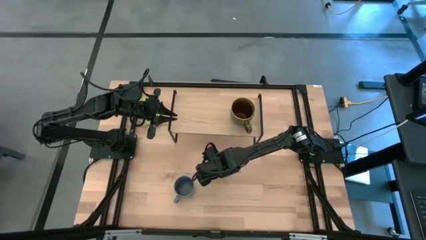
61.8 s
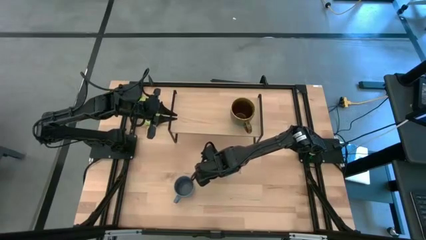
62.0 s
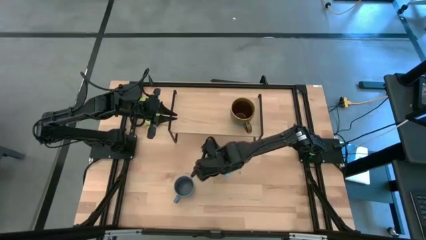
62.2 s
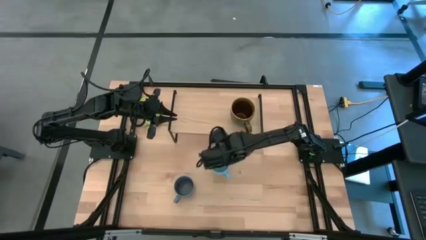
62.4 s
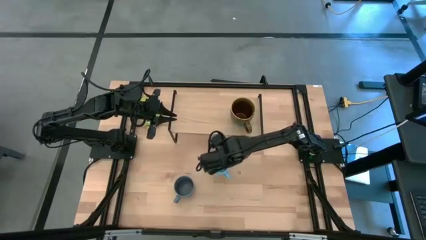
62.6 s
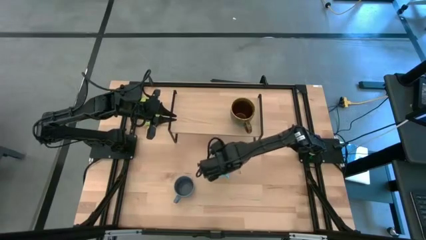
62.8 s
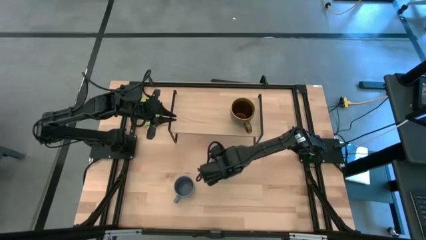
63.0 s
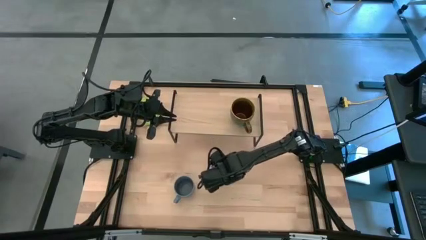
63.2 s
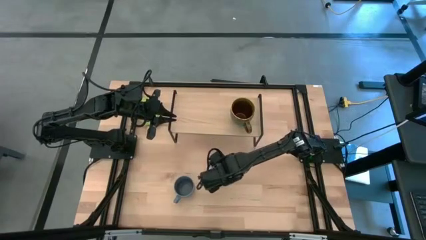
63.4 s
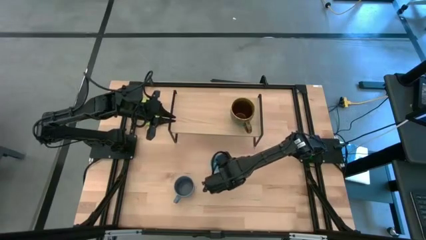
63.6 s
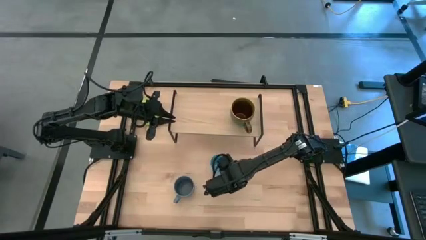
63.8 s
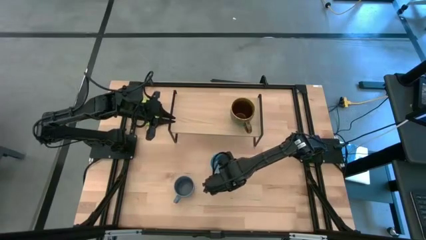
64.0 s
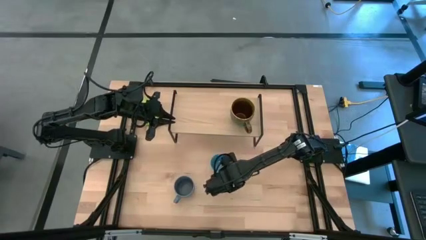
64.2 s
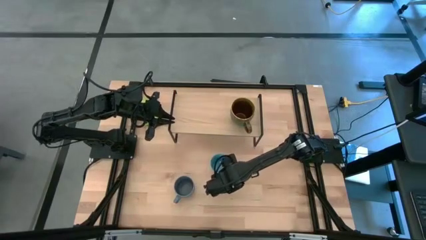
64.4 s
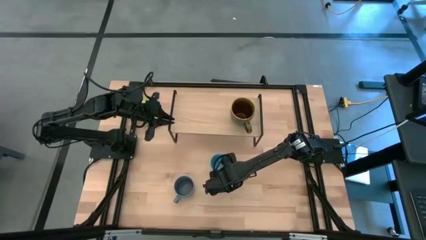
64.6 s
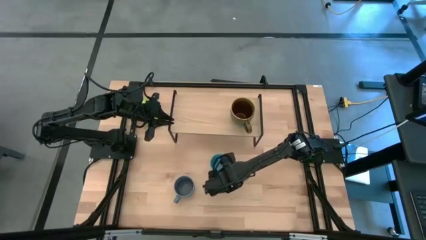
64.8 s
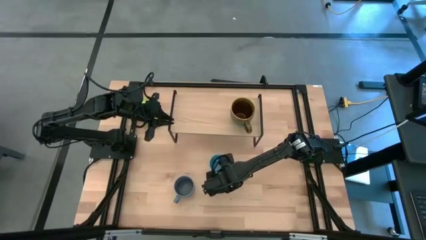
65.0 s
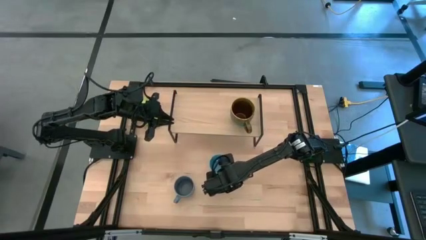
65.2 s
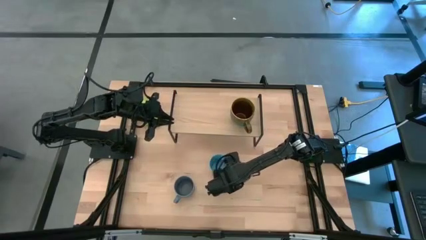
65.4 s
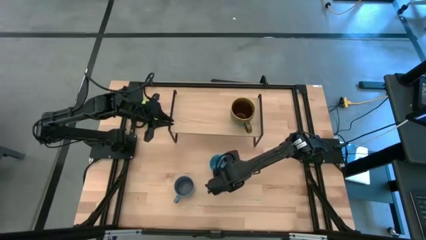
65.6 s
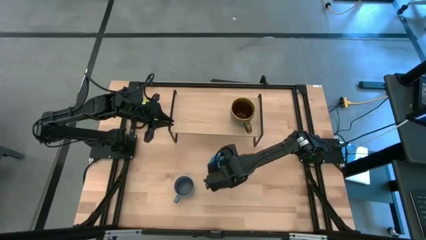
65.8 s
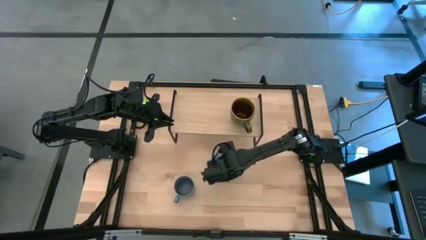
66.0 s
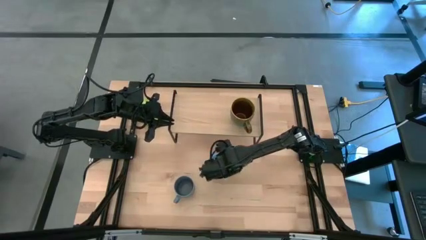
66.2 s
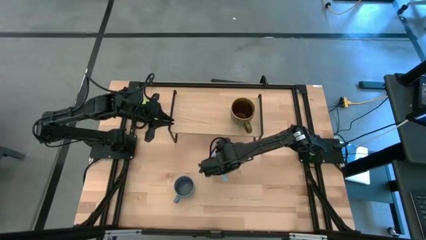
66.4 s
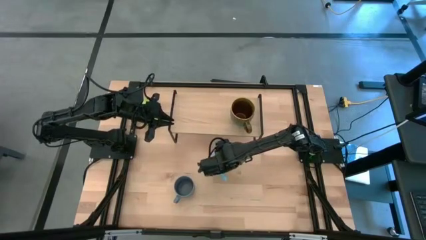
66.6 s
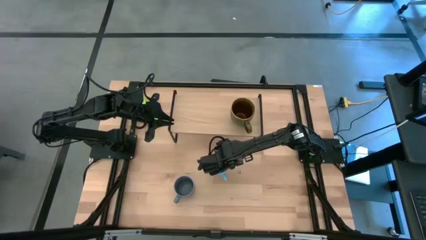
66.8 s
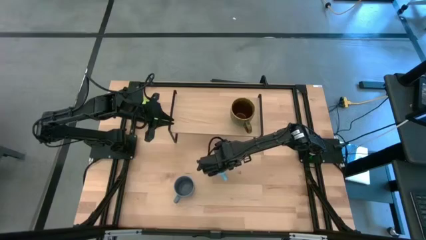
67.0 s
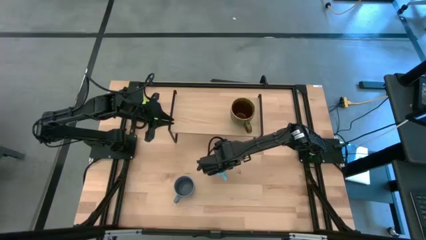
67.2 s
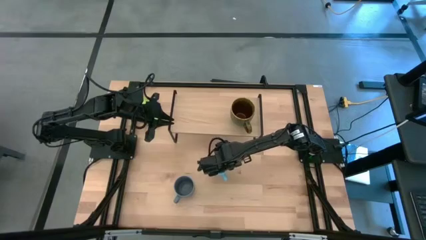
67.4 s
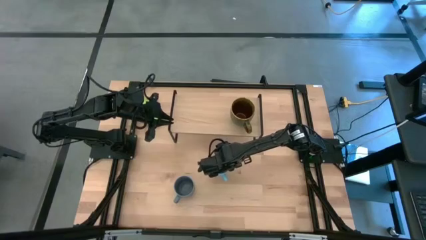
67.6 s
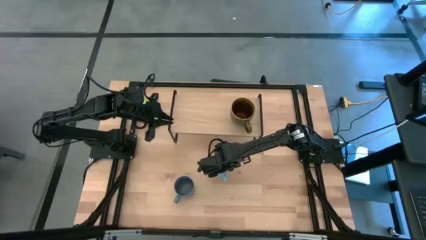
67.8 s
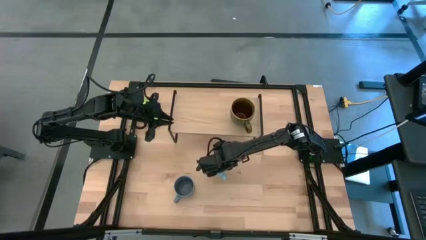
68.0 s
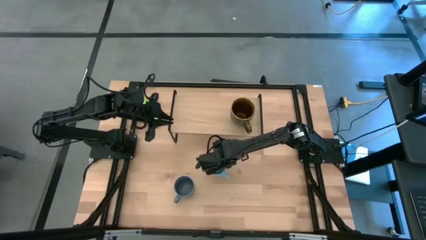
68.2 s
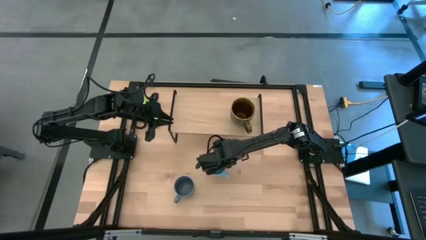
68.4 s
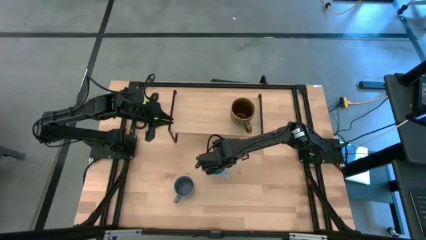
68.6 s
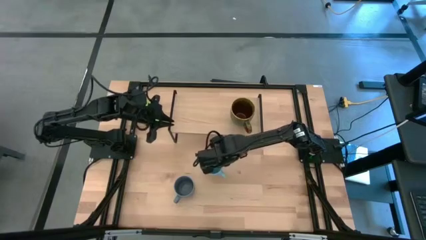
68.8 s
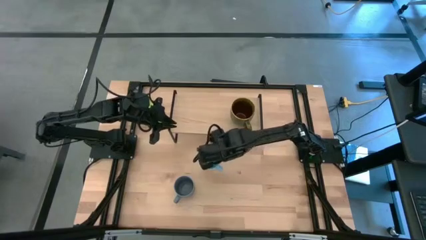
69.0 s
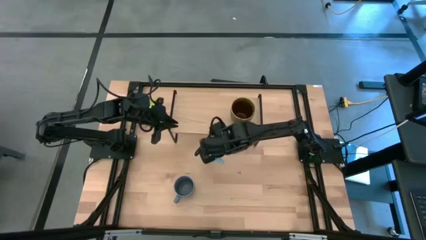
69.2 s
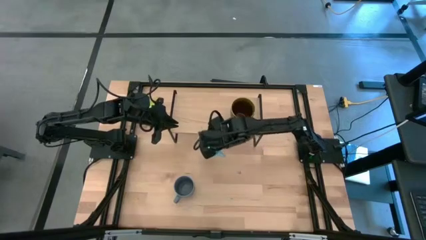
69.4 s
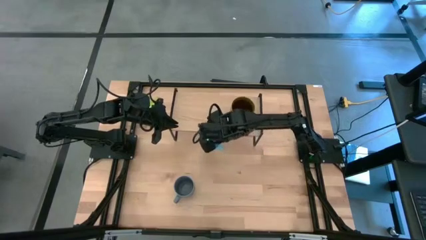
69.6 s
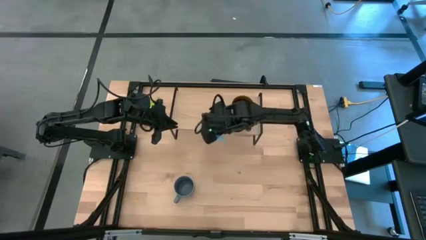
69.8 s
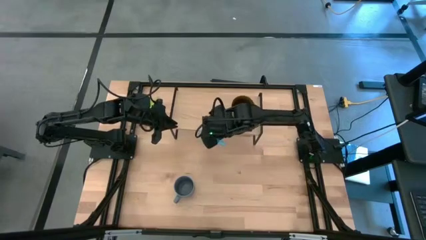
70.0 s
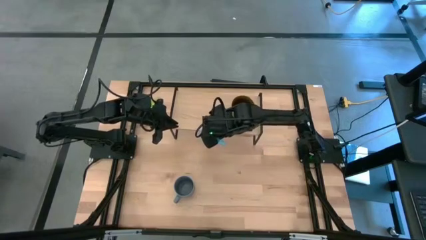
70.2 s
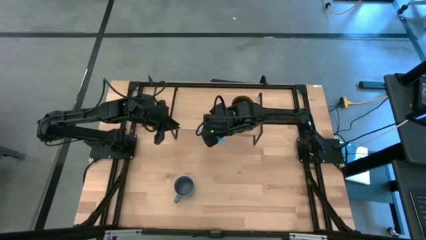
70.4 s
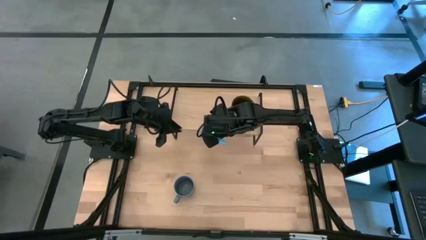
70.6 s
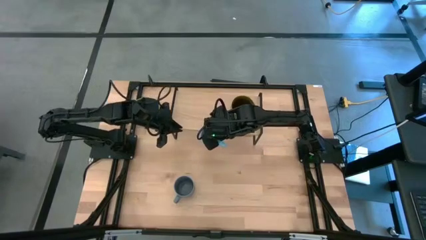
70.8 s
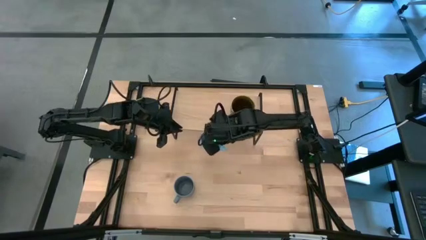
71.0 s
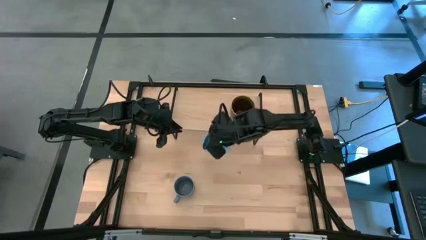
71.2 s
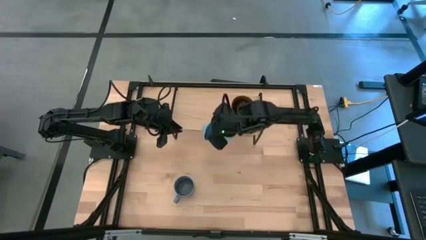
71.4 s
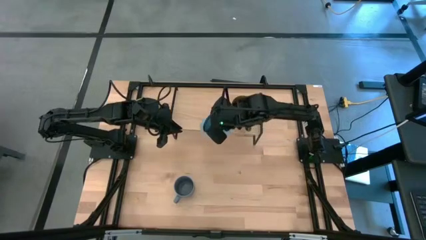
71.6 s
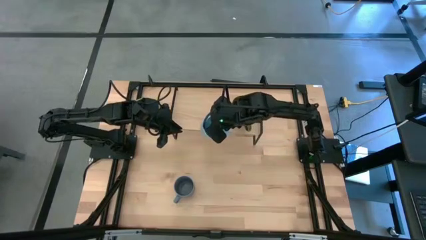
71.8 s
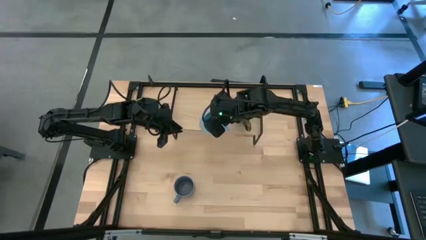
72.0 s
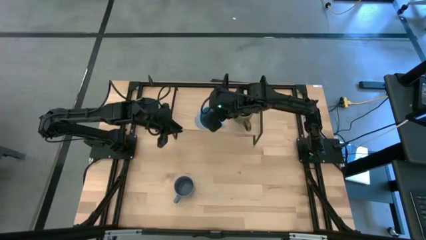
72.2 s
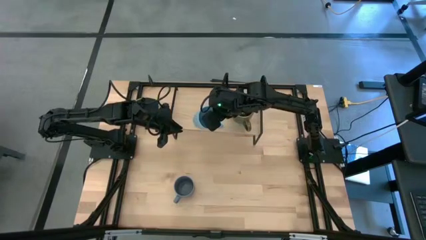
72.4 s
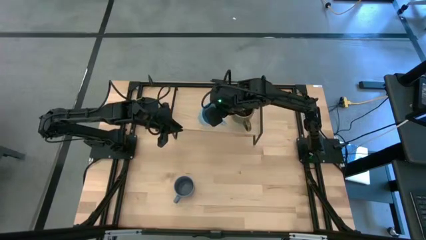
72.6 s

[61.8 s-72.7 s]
Task: Stack small to large cups/mugs on shelf
Put the blue mug on the shelf
